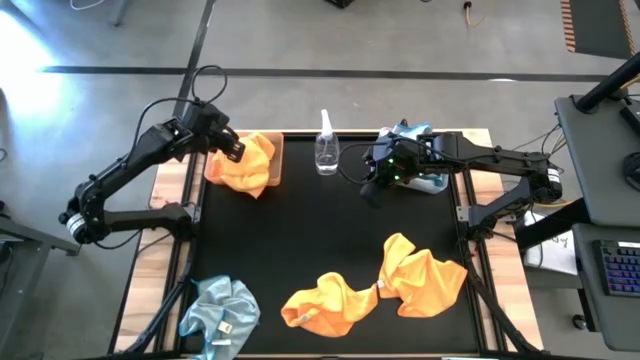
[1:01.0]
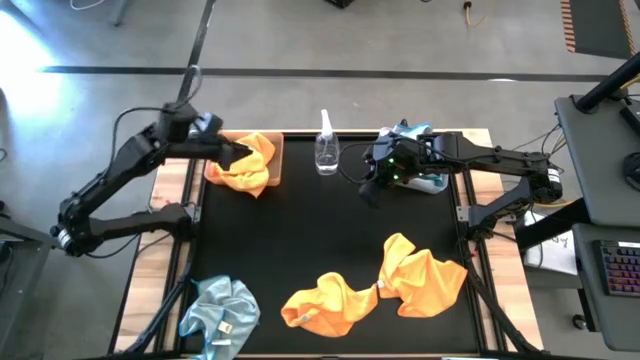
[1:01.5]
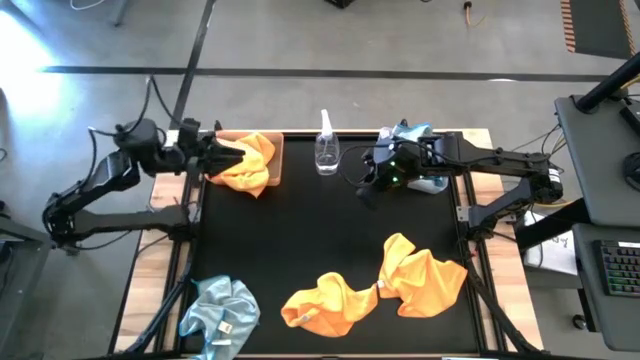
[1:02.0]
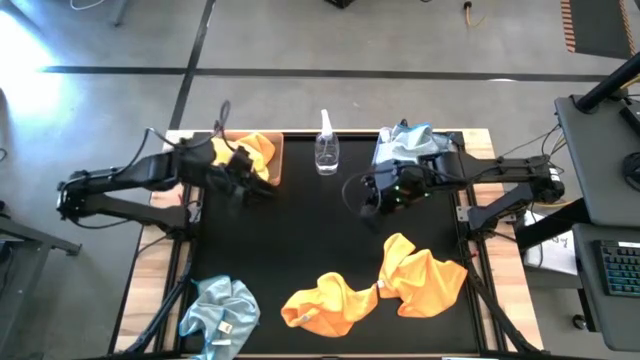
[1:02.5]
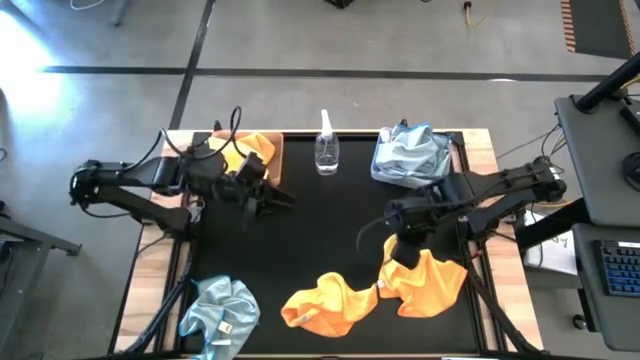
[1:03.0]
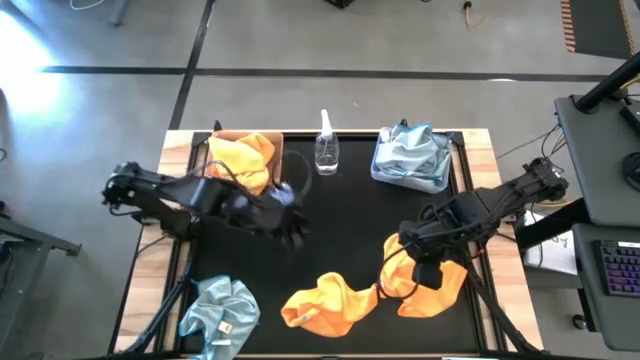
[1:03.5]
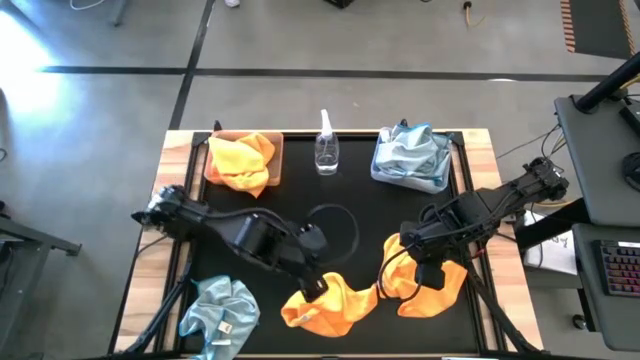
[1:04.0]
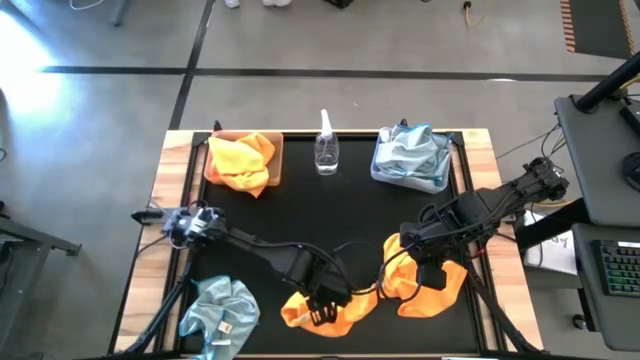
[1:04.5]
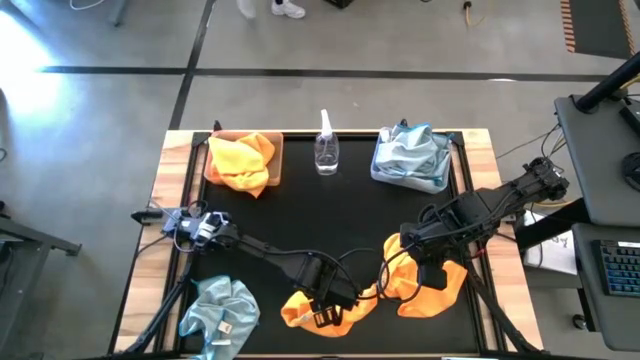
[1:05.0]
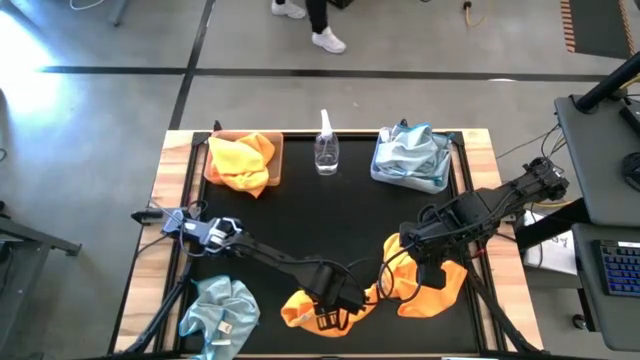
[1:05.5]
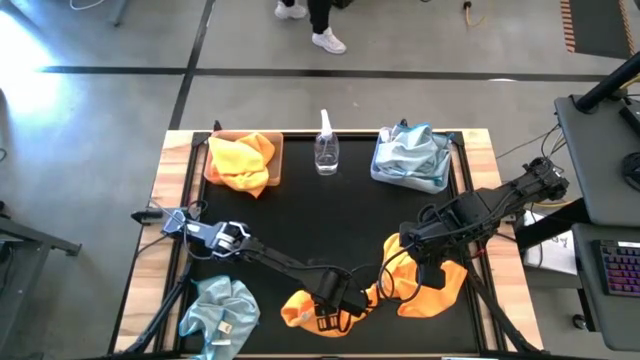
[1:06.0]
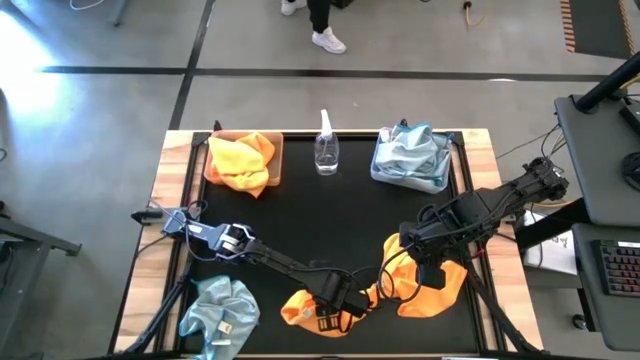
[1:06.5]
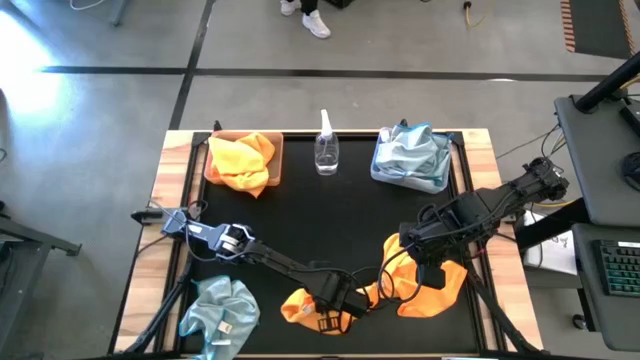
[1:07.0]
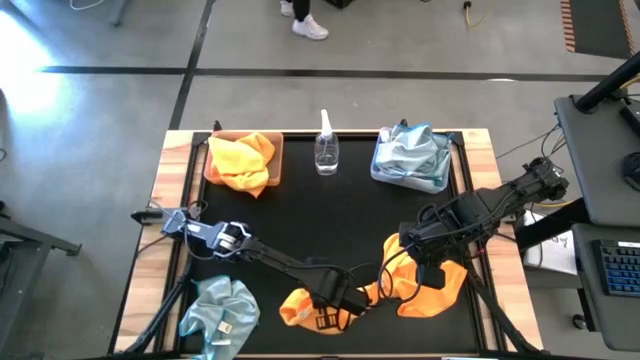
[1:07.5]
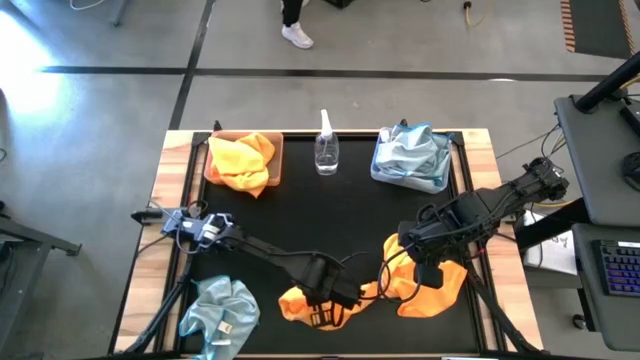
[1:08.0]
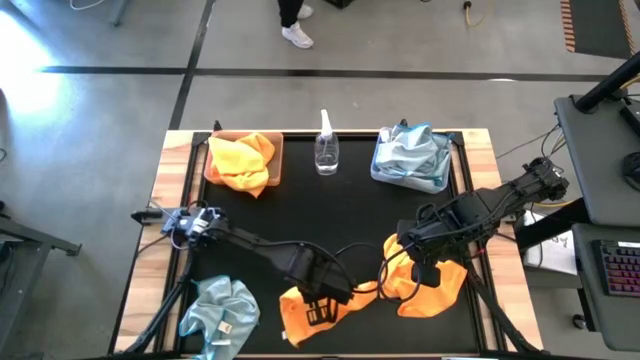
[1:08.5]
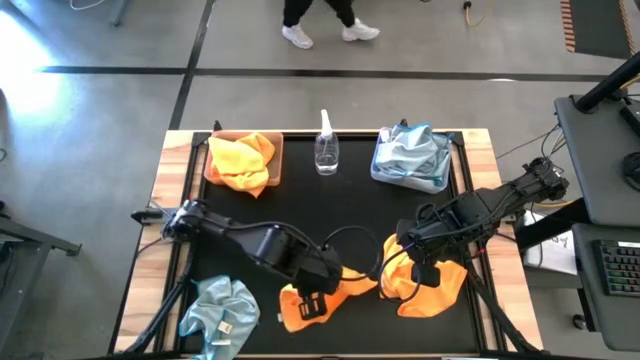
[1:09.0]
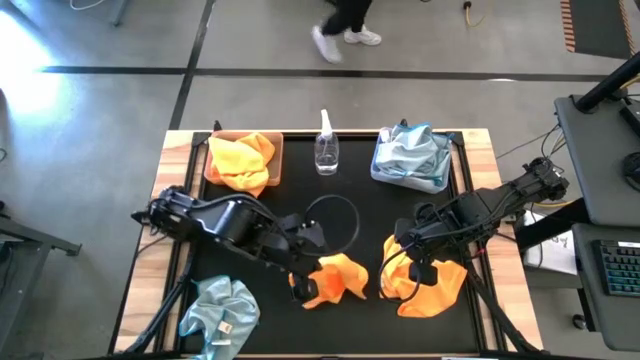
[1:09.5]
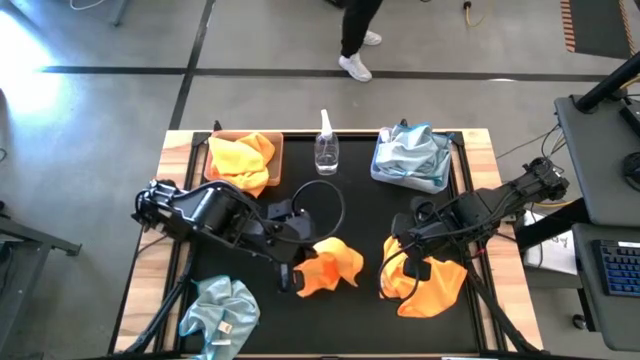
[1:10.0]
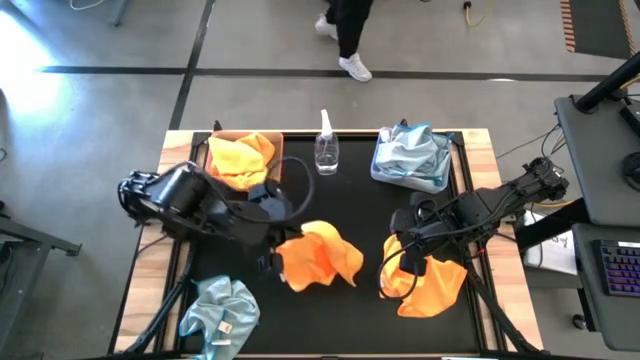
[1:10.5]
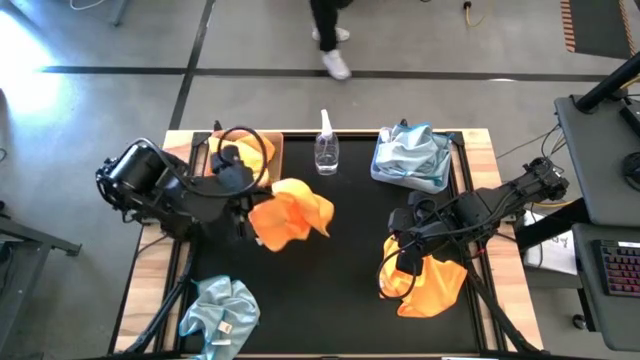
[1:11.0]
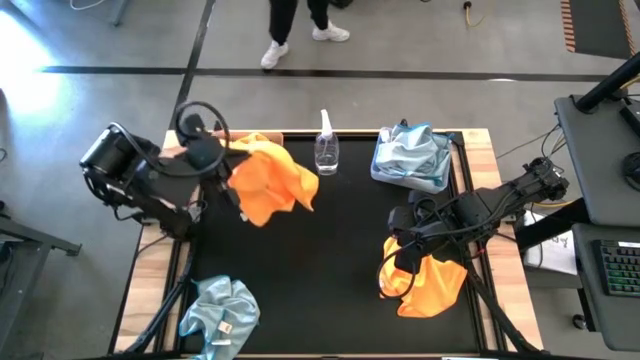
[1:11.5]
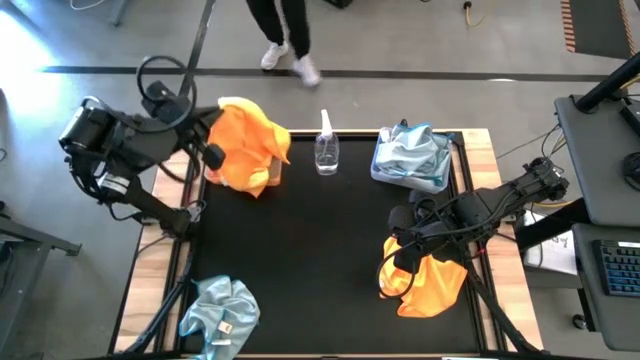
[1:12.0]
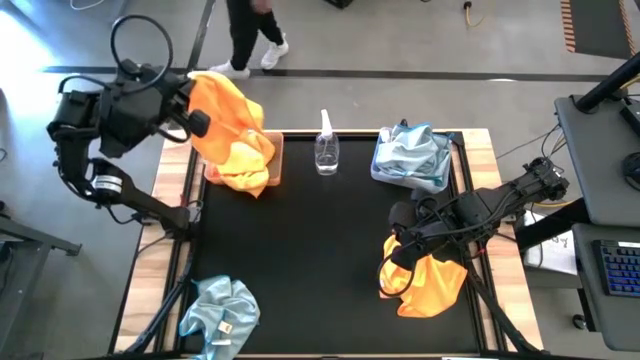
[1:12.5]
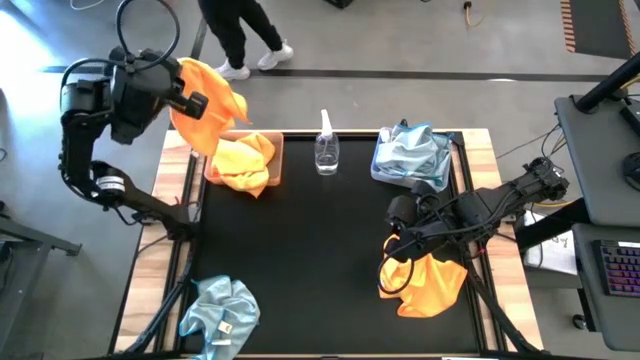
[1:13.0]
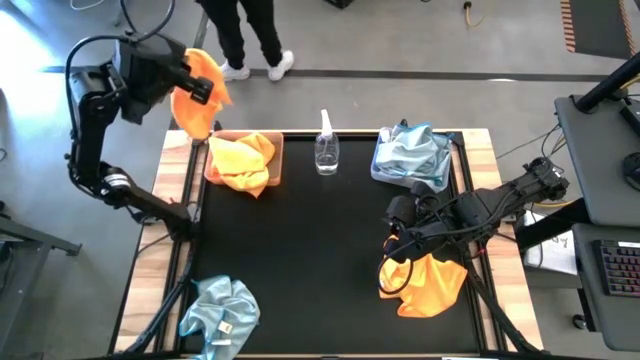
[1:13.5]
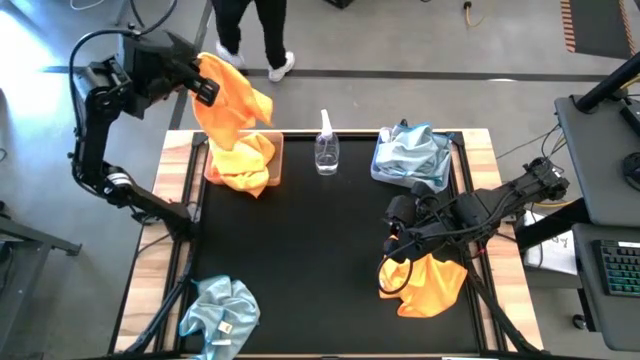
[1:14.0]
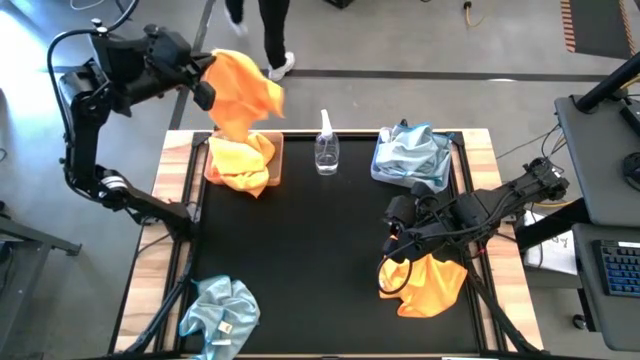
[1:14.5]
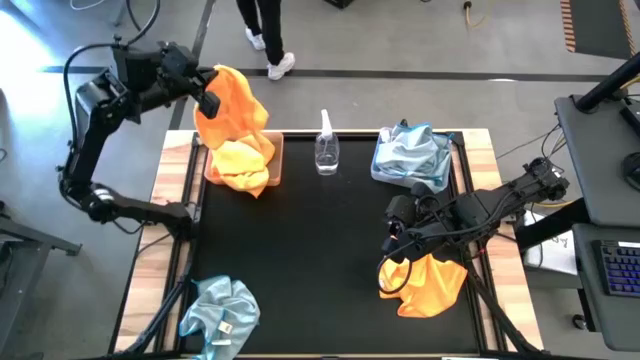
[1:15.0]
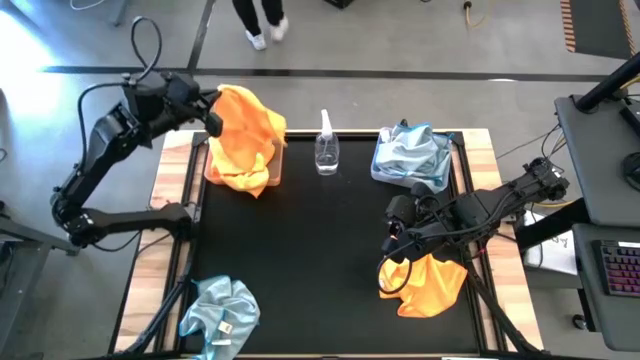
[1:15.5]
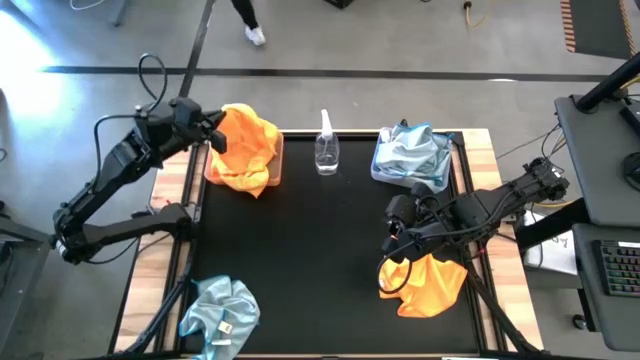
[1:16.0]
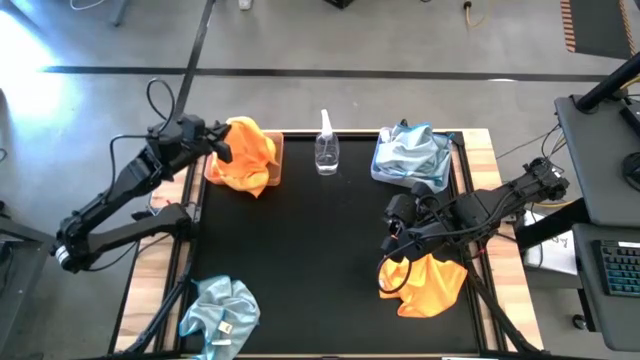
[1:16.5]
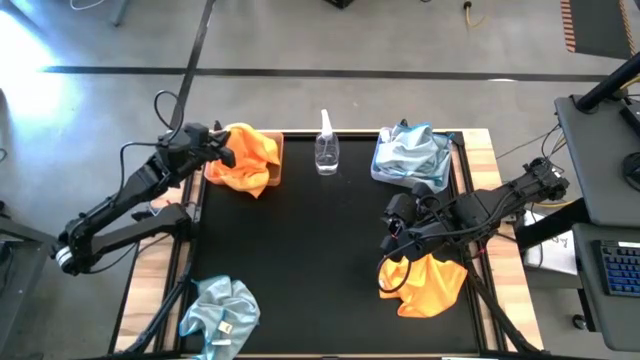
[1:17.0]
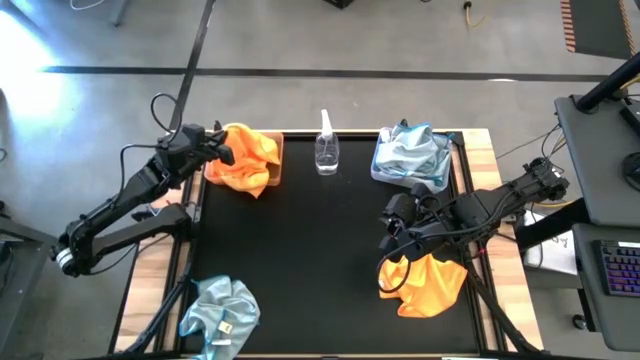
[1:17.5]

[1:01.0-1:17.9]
Task: Sort microfiber towel by color & place in baskets
Put the yellow towel into the orange bin

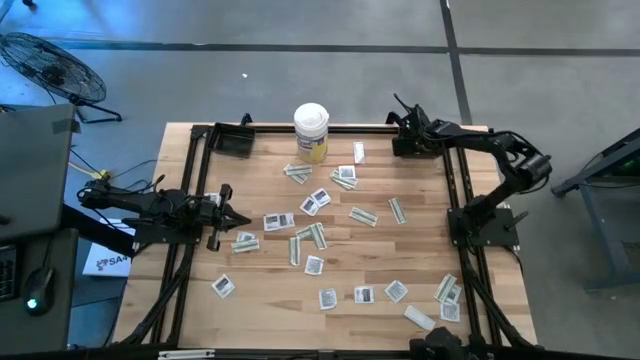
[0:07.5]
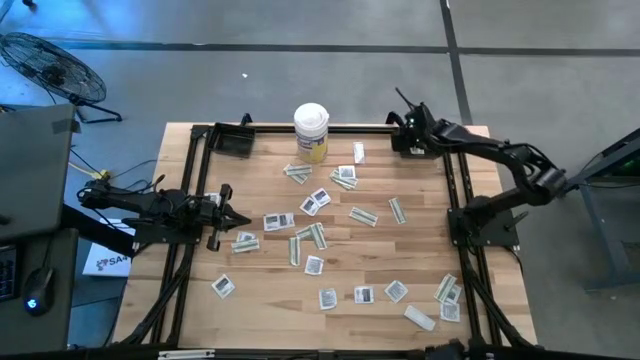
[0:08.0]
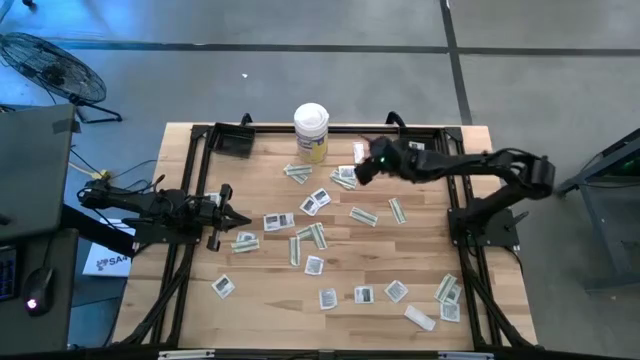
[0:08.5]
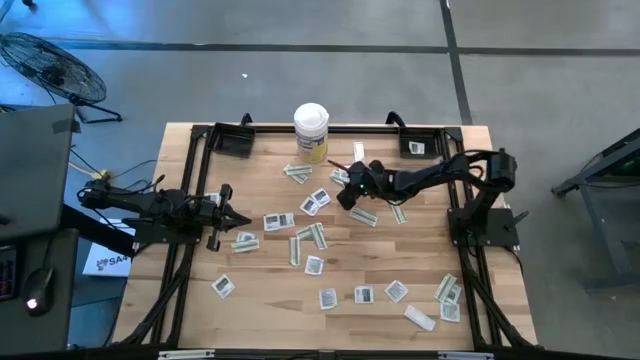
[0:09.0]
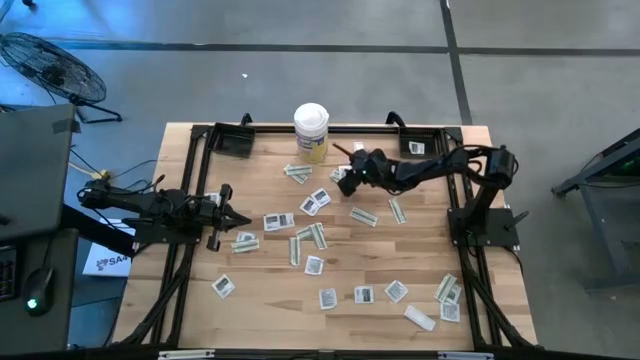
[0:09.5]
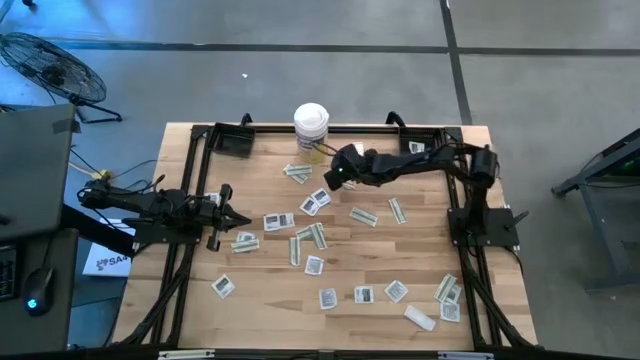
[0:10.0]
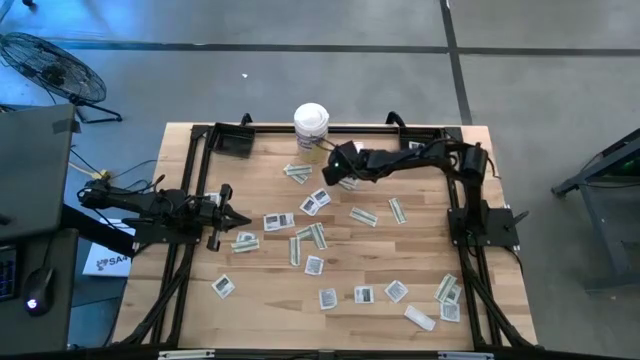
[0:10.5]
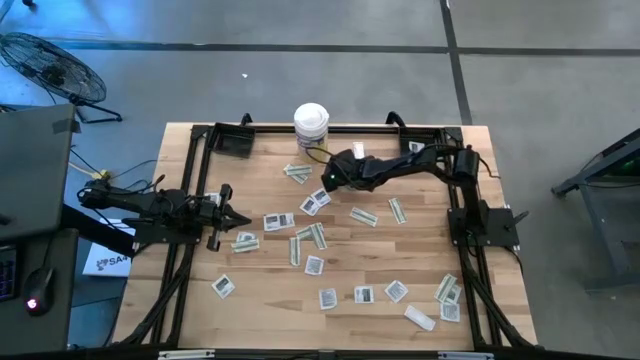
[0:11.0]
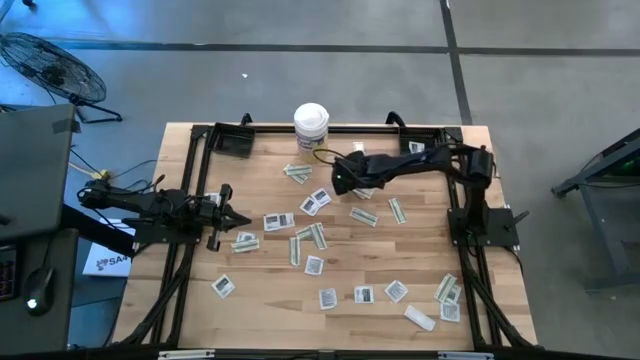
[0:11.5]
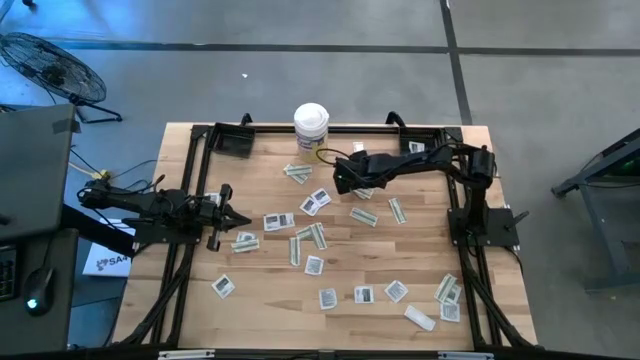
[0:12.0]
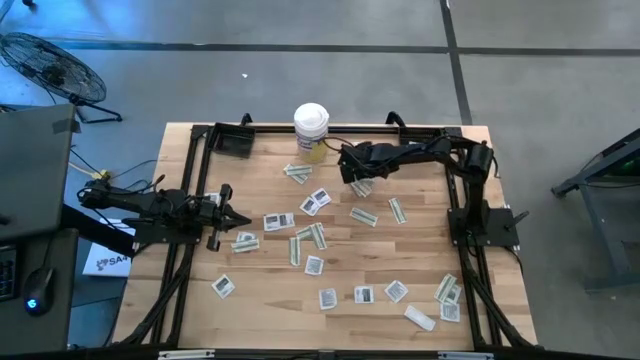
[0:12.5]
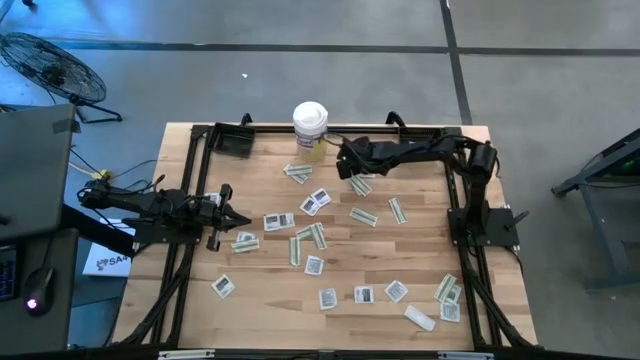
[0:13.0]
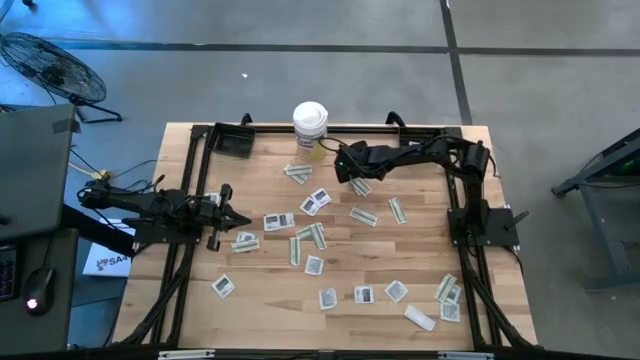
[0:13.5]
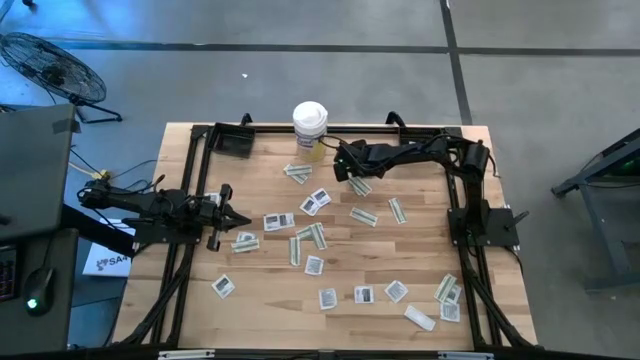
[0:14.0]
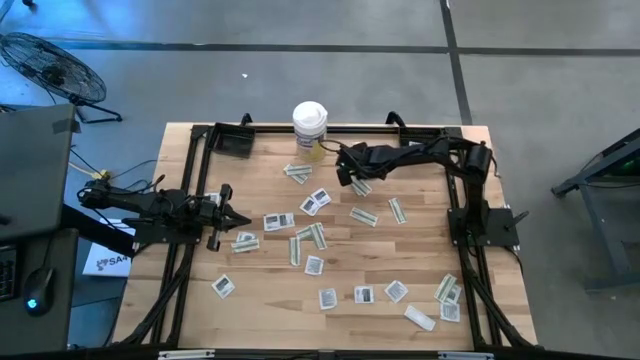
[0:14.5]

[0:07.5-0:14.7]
Task: Pick & Place First Aid Supplies
Put the black towelette pack into the right black basket
